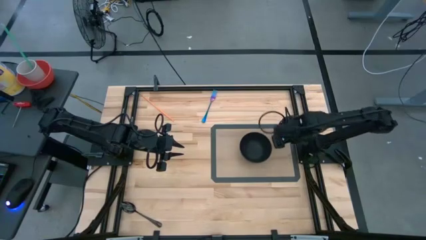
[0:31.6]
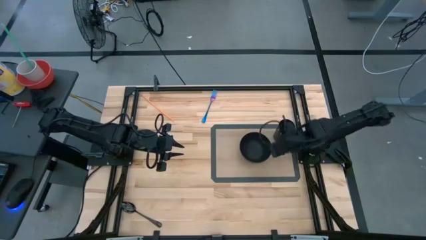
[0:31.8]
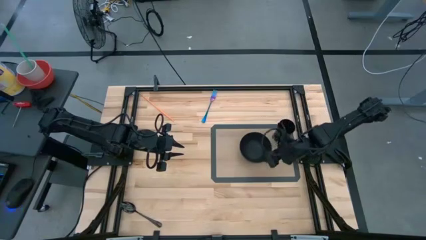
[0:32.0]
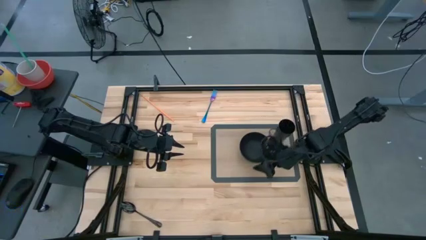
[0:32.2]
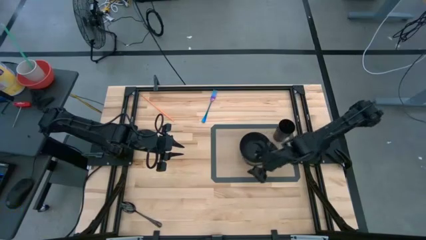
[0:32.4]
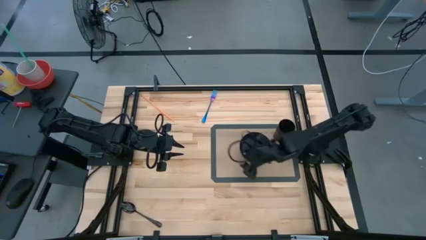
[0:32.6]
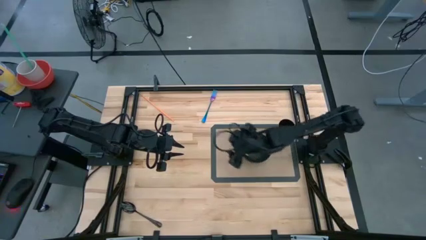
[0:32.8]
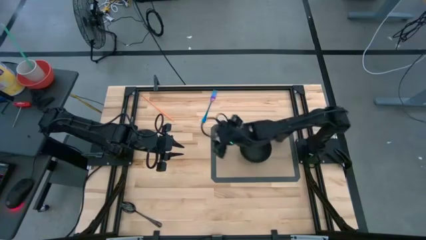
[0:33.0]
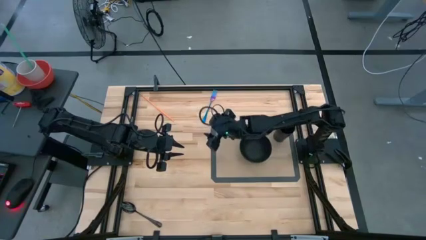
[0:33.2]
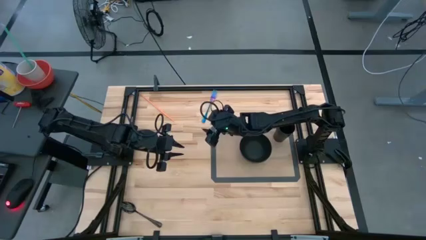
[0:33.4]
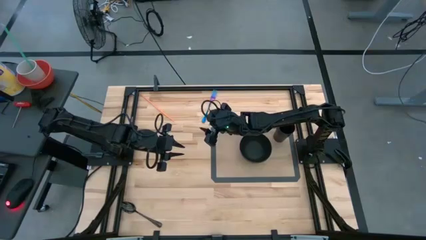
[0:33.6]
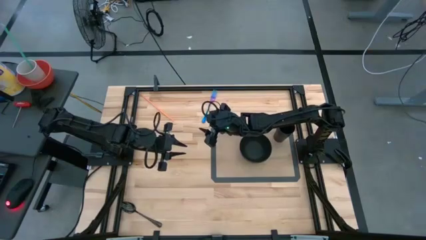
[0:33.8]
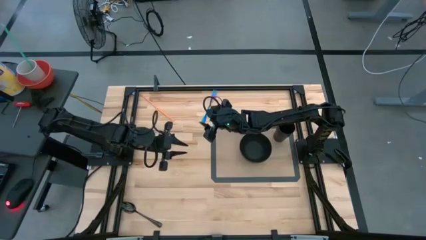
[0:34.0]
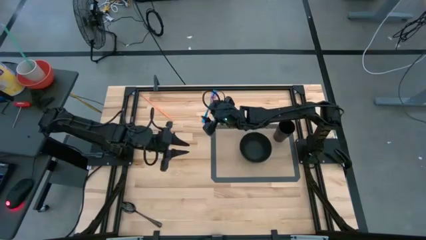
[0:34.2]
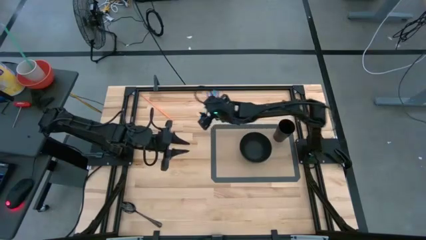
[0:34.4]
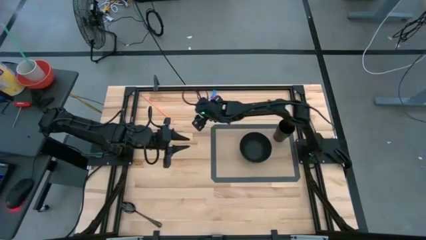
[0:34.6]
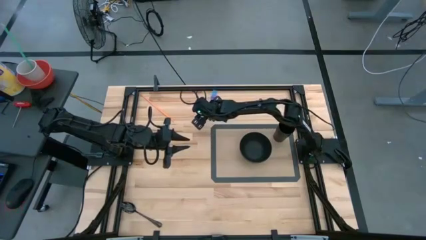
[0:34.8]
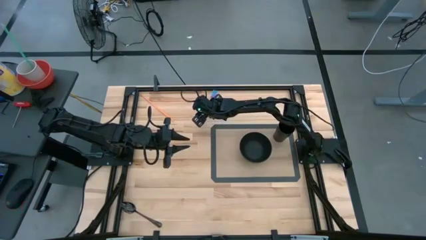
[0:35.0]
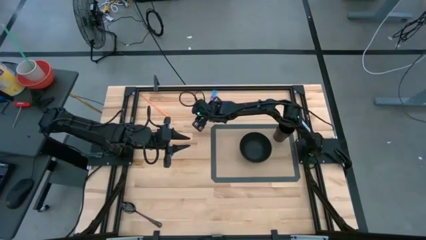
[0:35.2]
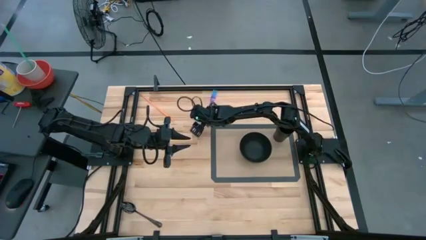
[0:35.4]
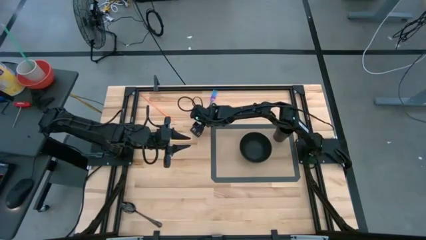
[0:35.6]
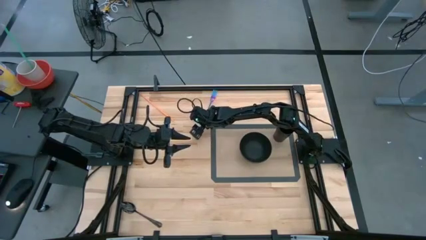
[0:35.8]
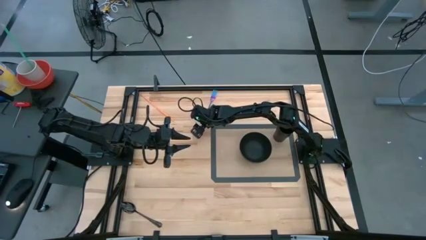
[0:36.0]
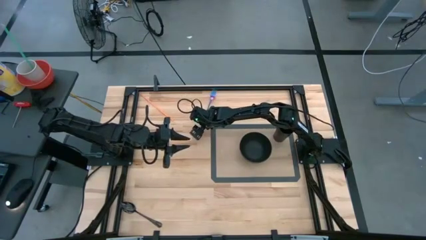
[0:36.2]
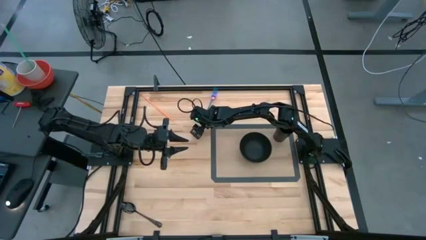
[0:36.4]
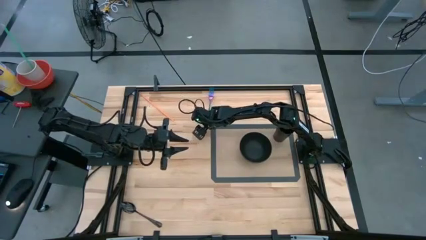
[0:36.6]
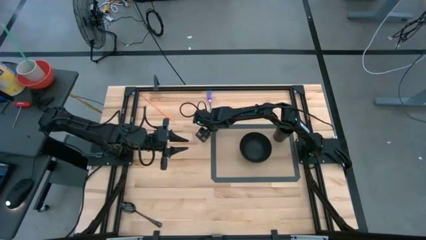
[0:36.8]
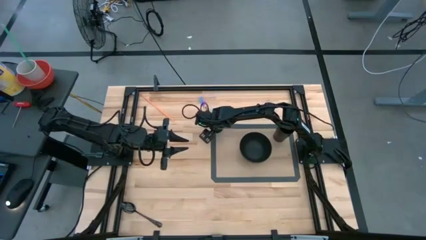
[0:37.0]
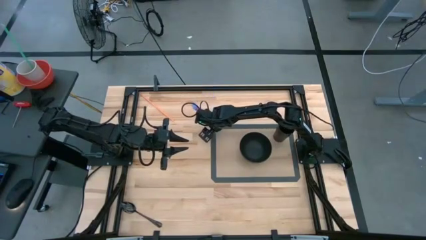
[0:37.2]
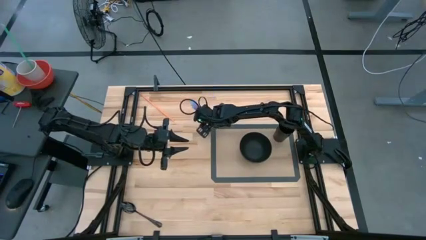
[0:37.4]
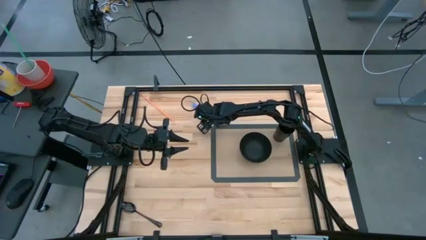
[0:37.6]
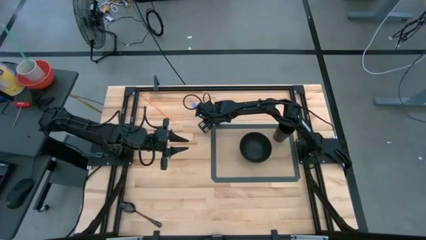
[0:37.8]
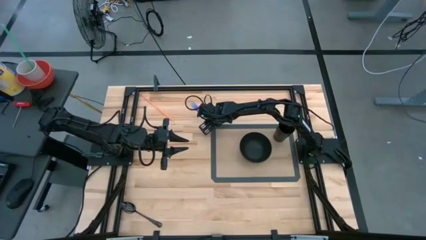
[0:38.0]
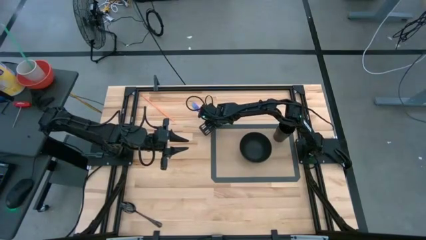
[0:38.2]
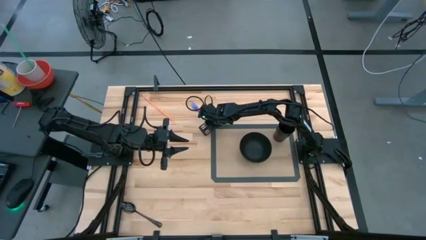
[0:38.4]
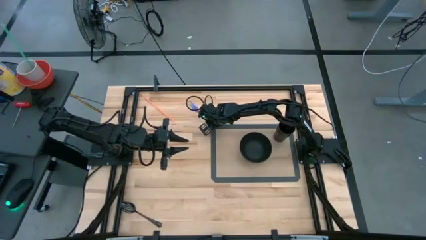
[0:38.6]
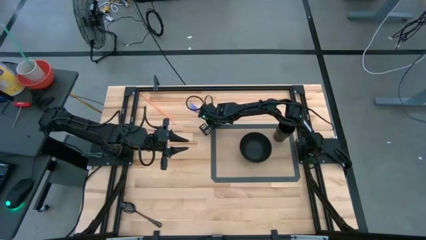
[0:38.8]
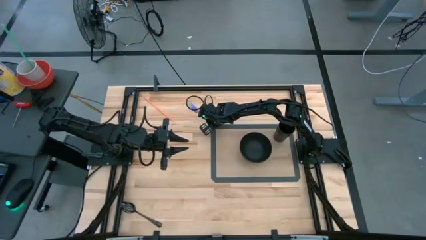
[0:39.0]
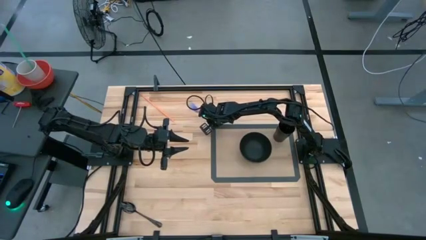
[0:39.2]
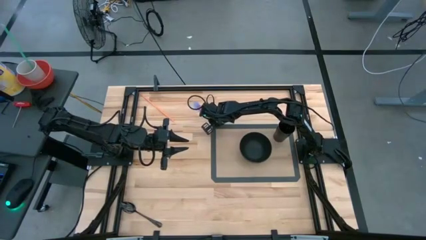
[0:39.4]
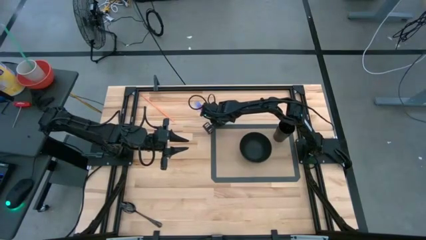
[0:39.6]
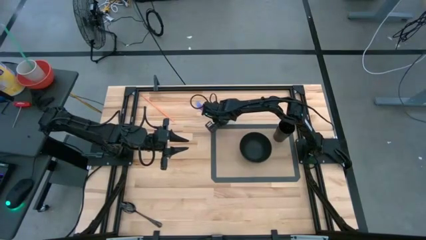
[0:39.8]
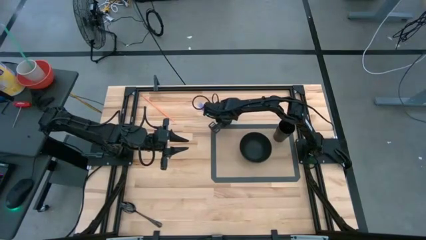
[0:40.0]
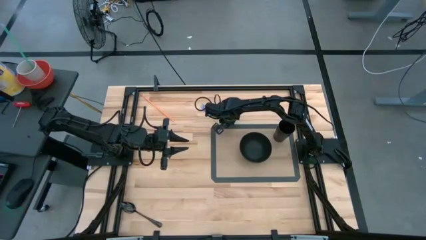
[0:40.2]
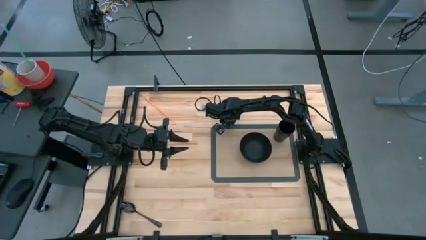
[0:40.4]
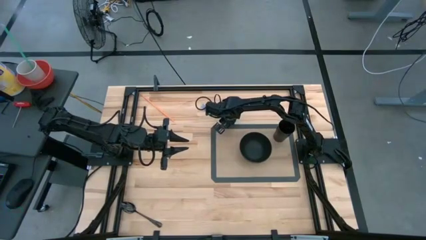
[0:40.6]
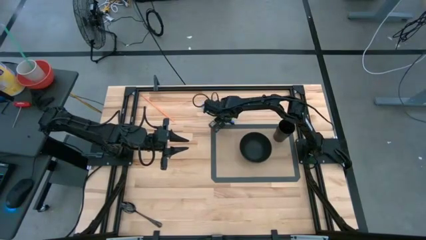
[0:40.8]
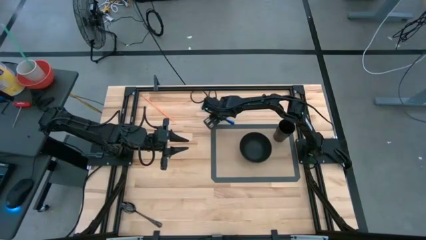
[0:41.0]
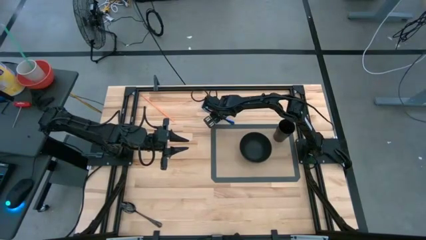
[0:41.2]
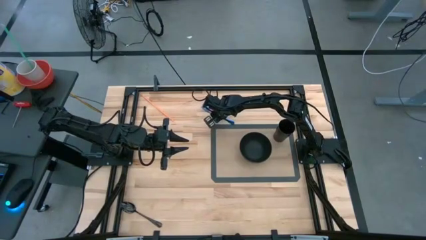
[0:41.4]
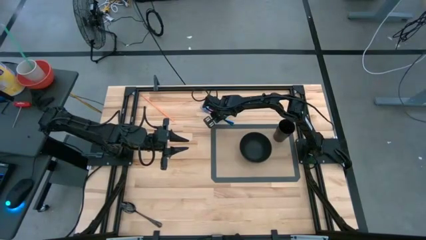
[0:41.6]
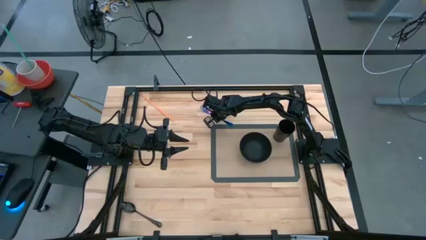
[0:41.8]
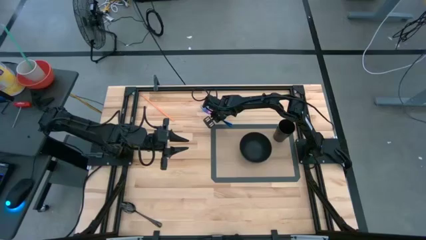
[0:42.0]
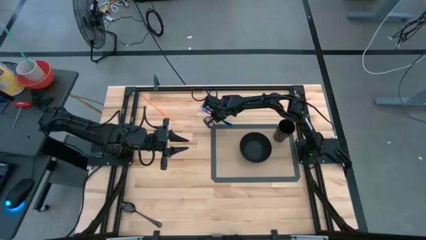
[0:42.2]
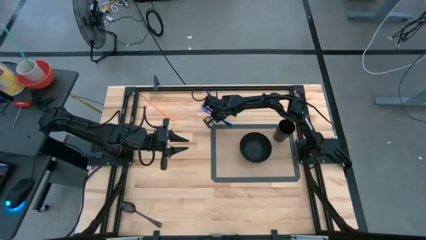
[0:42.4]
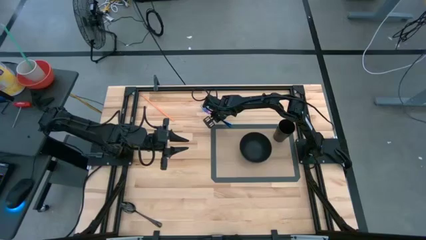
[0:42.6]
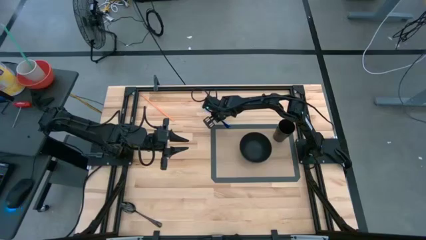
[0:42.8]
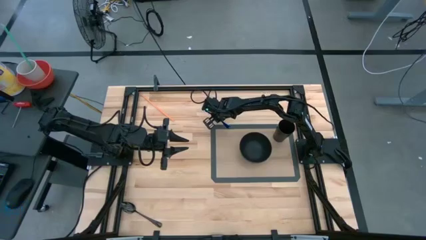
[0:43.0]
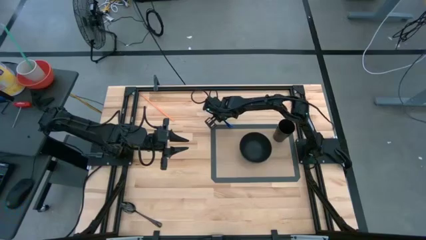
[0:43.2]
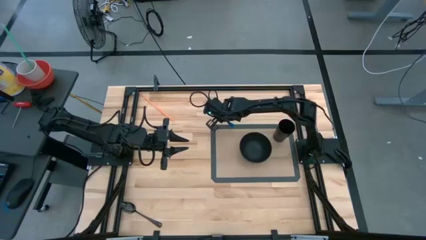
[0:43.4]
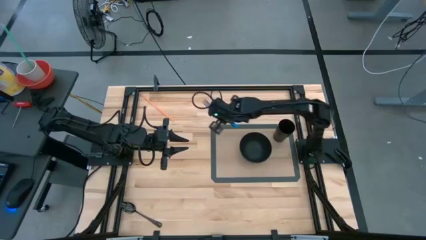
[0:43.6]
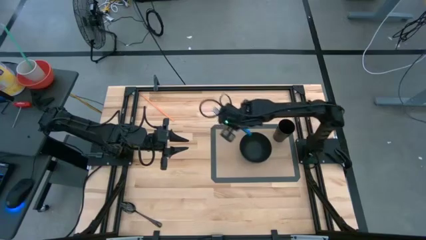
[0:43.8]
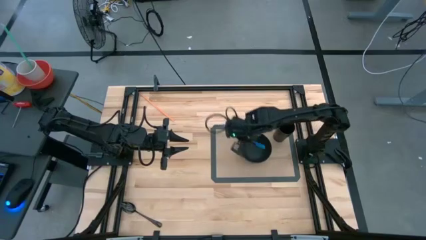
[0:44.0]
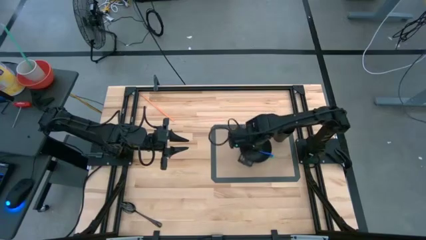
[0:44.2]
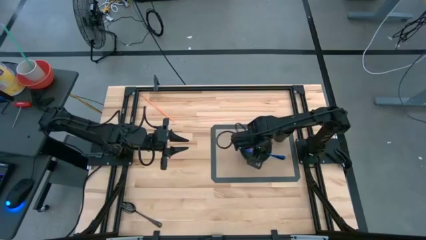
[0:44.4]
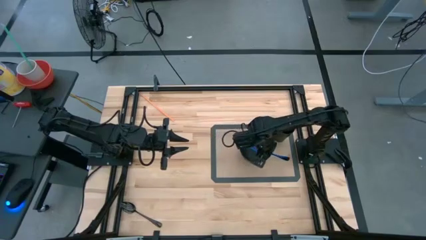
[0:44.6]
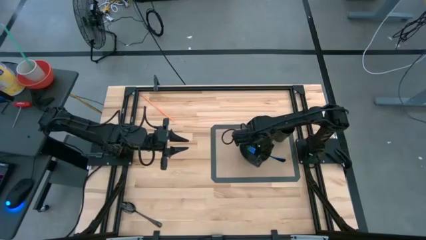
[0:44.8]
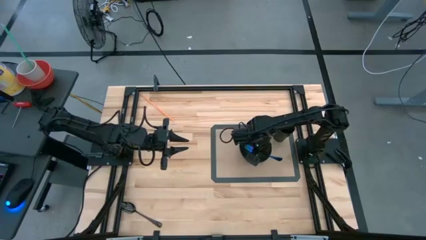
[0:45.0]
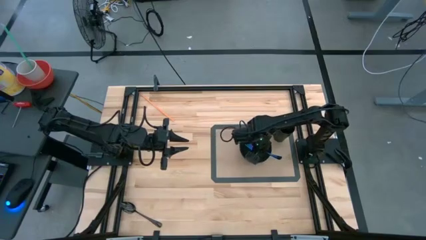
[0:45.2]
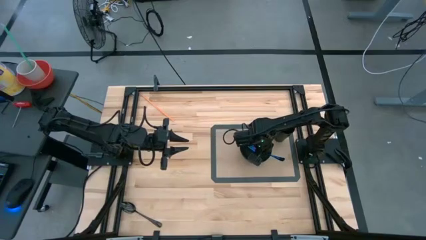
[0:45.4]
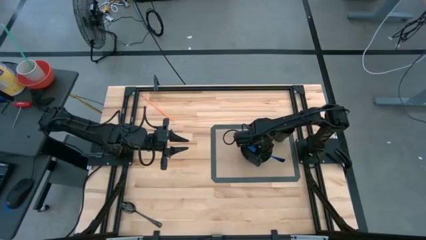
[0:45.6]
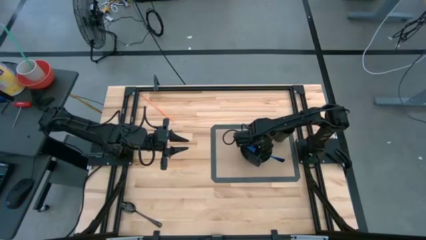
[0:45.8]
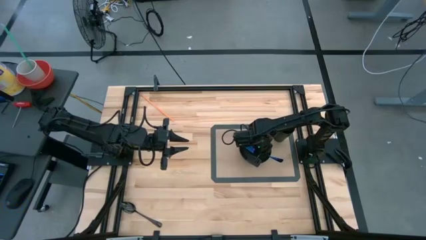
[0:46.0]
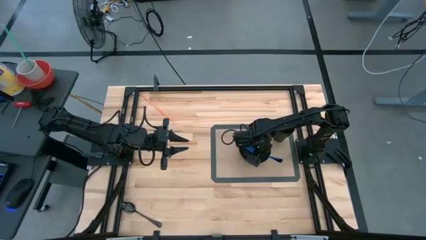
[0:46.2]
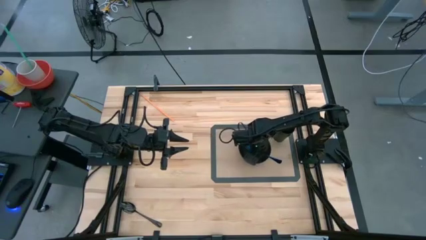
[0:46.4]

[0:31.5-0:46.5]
Task: Pick & Place Utensil
Put the blue fork into the black bowl
